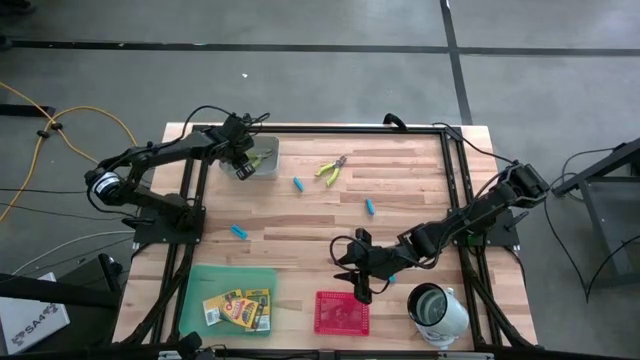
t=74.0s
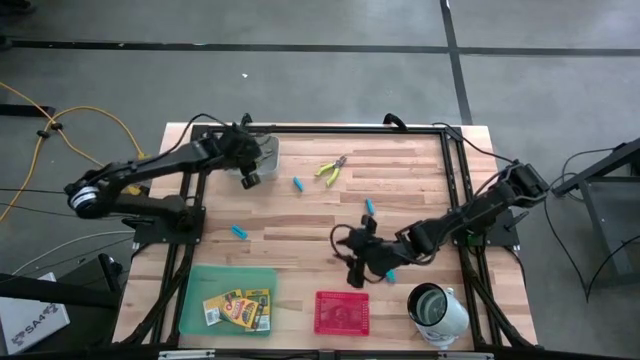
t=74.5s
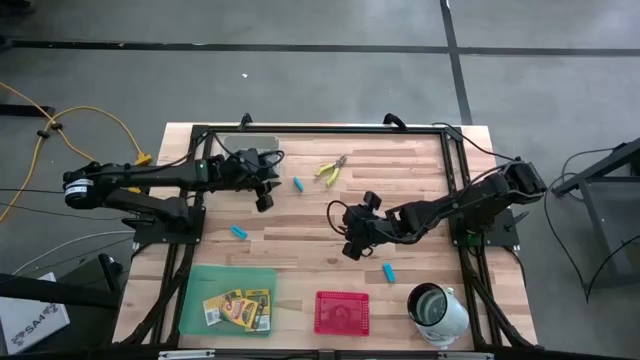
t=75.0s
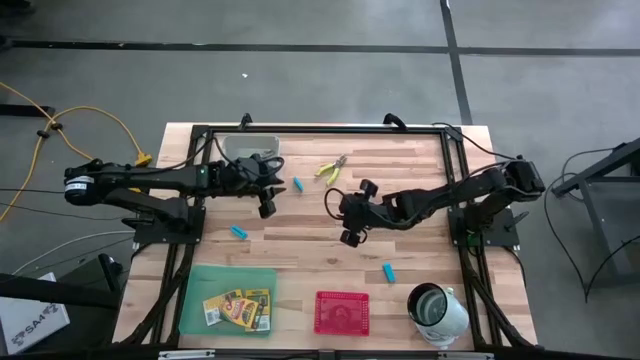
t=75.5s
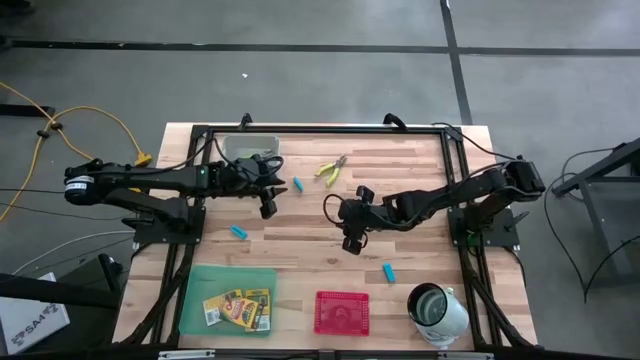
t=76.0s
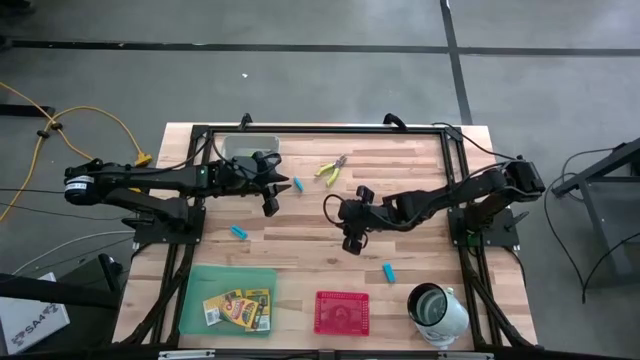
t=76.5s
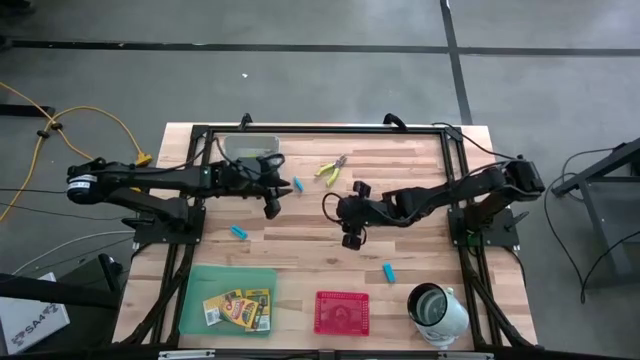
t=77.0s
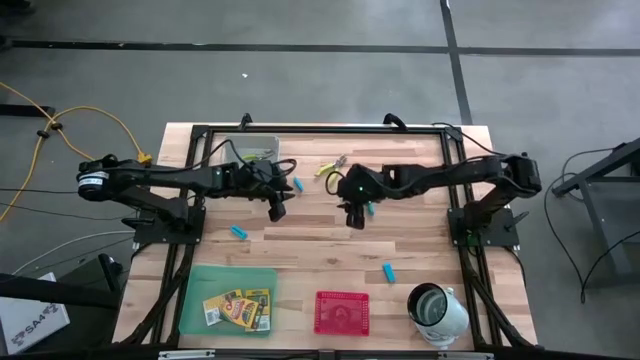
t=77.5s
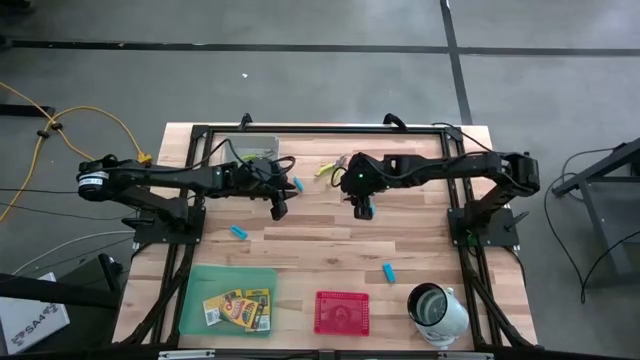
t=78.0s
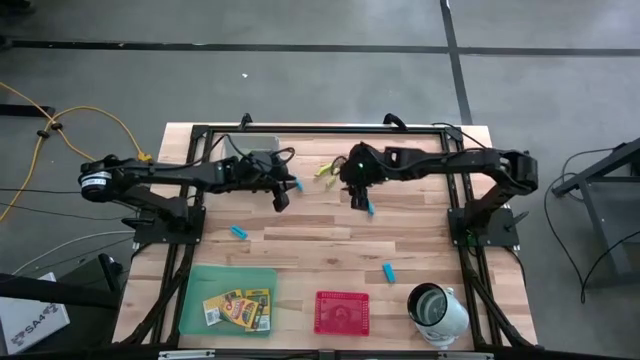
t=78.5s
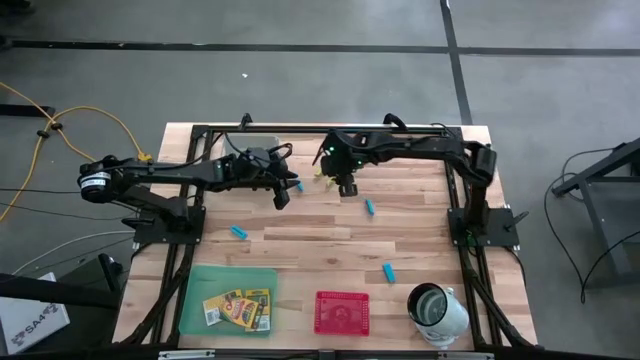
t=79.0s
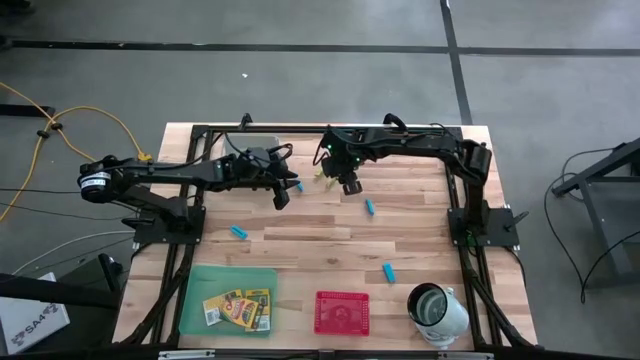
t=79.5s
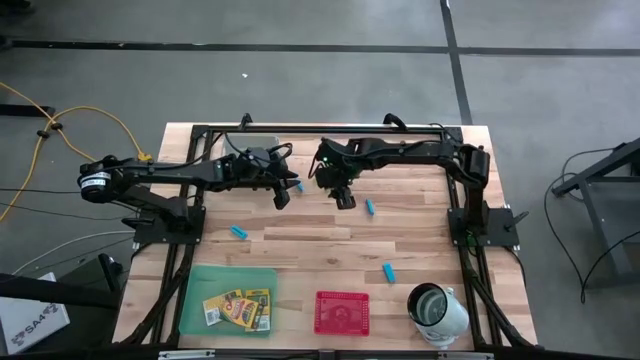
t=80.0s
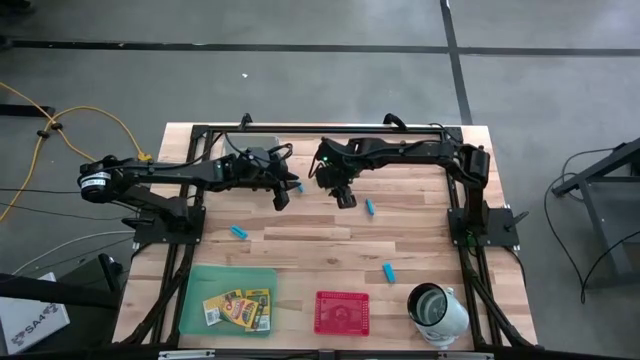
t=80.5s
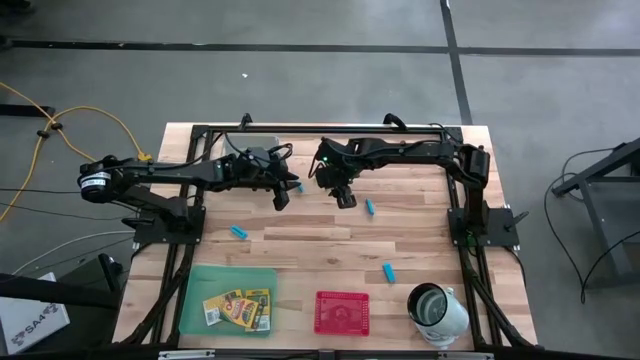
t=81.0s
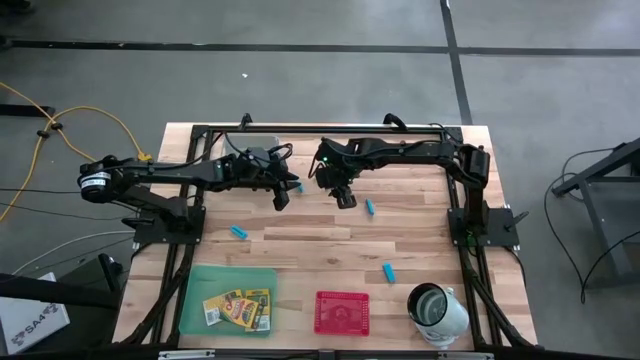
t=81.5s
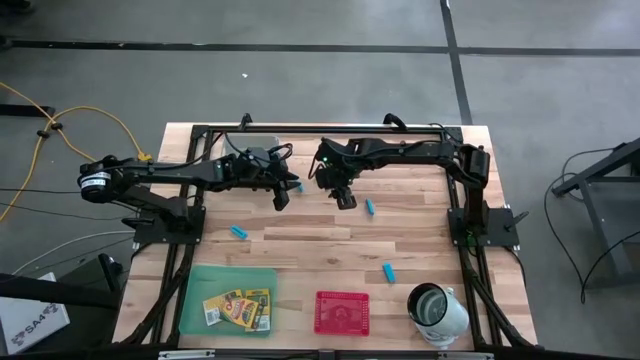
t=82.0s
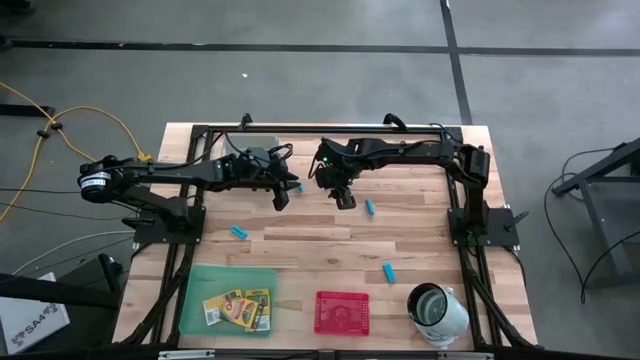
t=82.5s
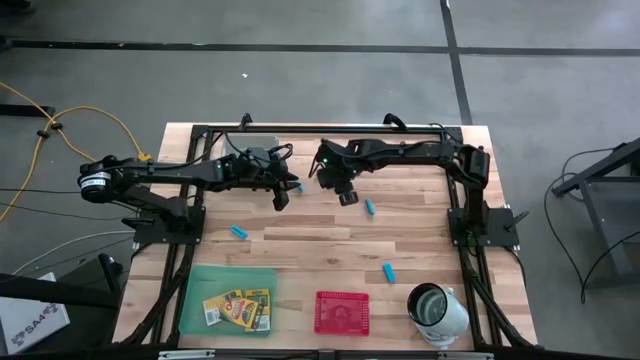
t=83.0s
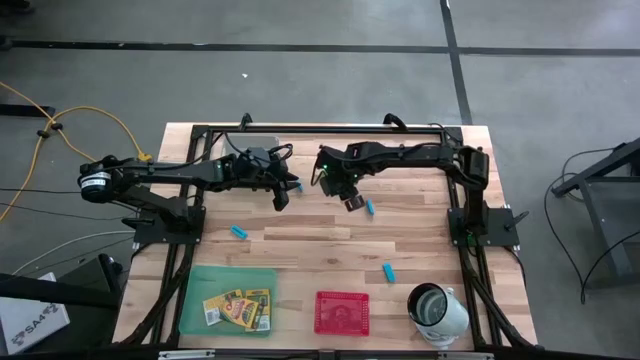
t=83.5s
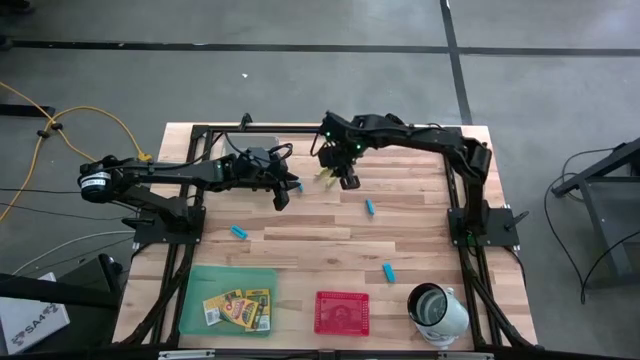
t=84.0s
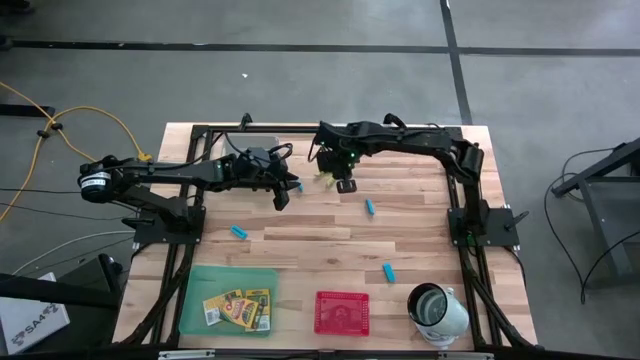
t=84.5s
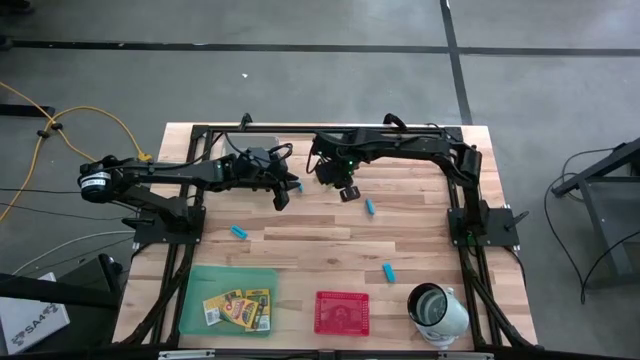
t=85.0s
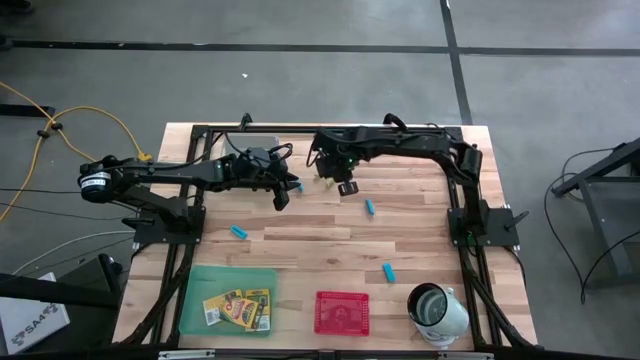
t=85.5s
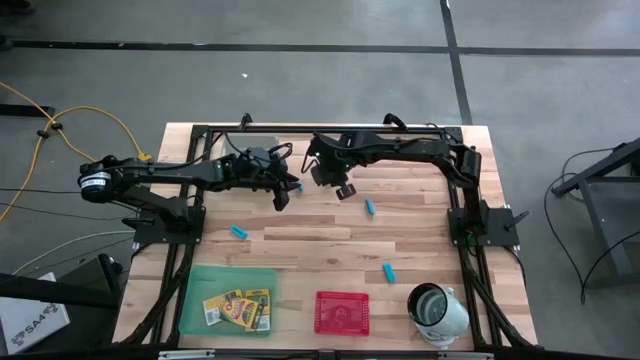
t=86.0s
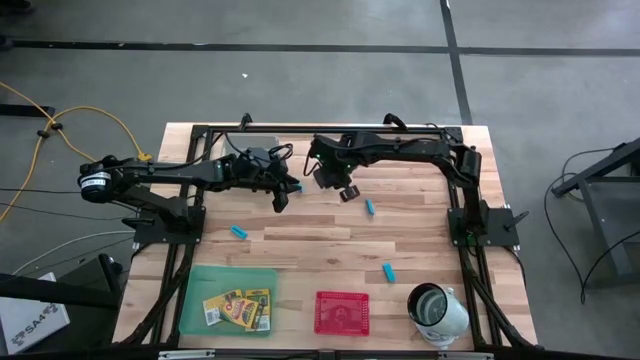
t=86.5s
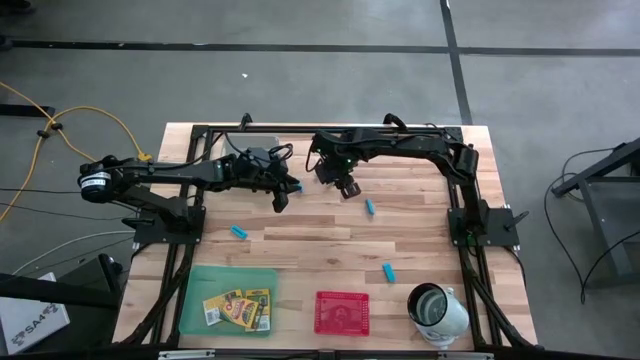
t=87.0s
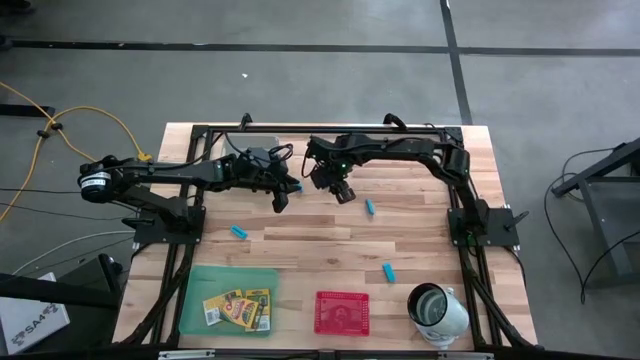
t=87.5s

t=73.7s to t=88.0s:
Task: Pick & Place School Supplies
Put the green hole puncher into the gray bin

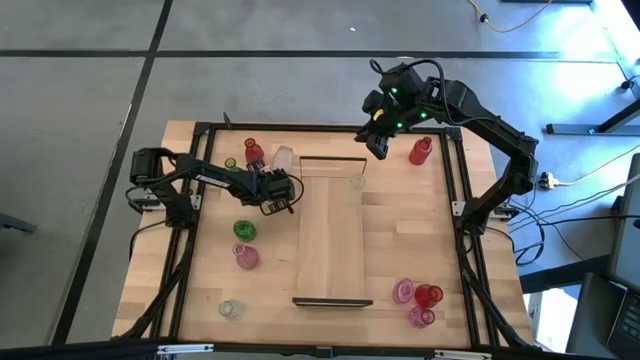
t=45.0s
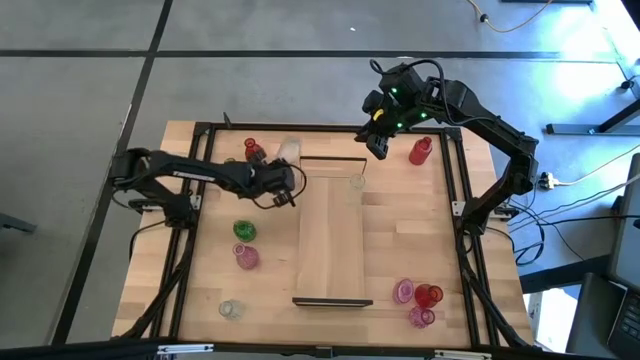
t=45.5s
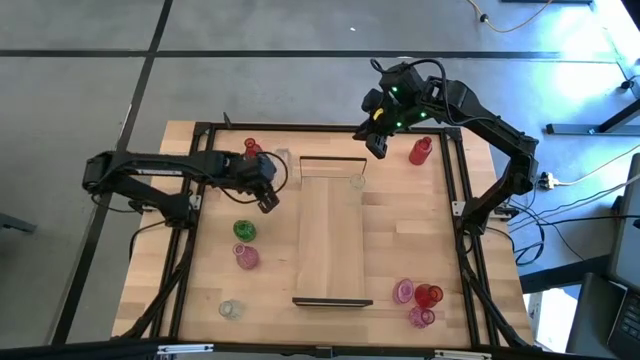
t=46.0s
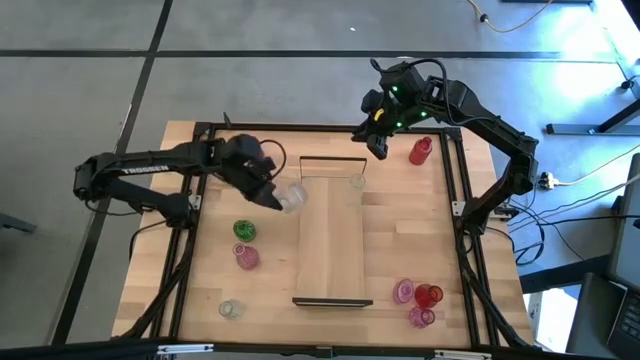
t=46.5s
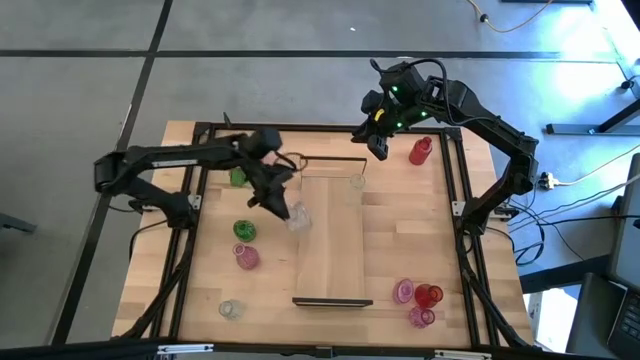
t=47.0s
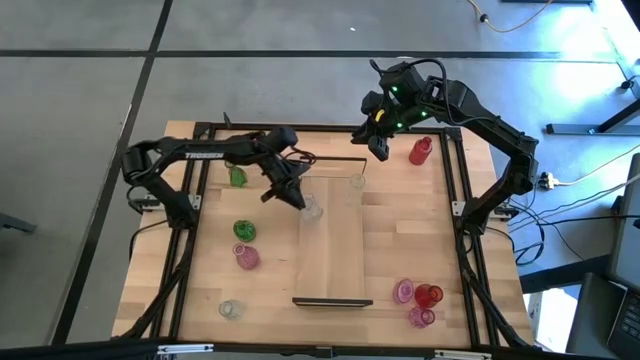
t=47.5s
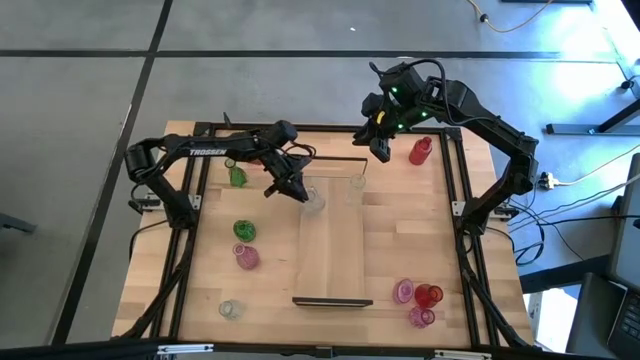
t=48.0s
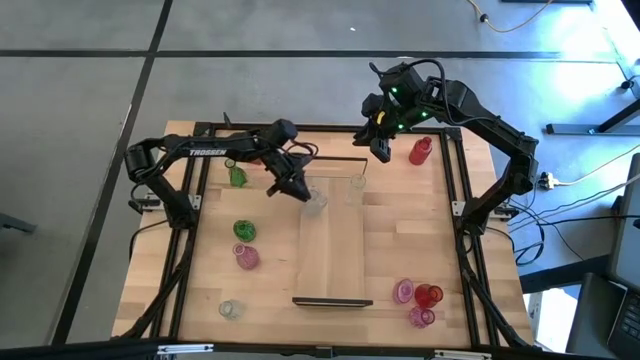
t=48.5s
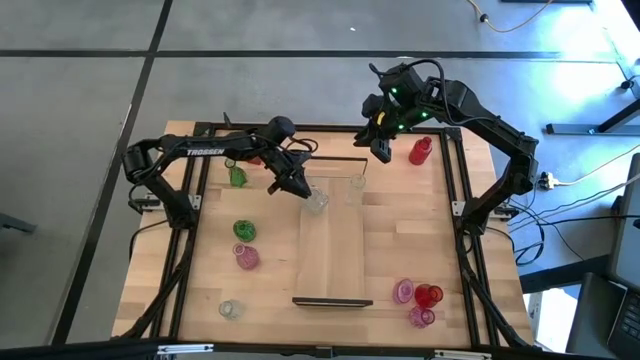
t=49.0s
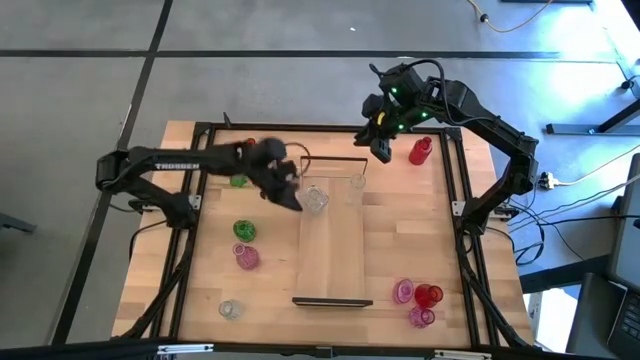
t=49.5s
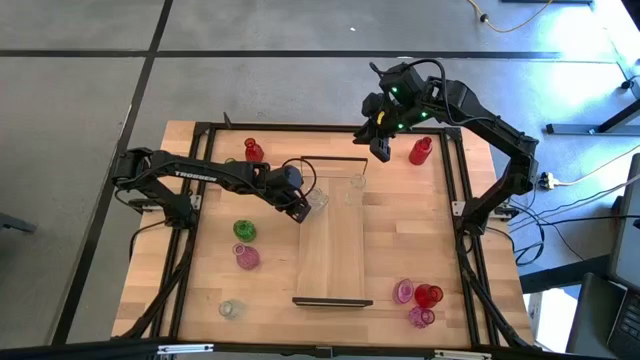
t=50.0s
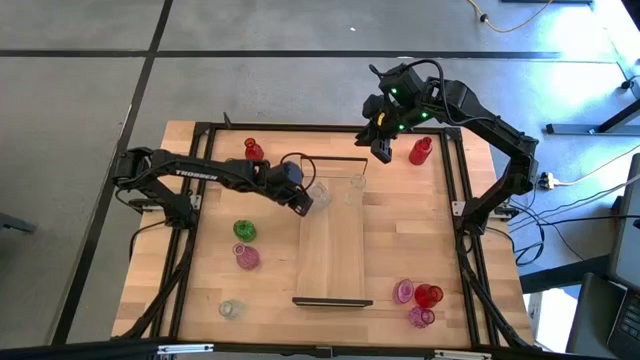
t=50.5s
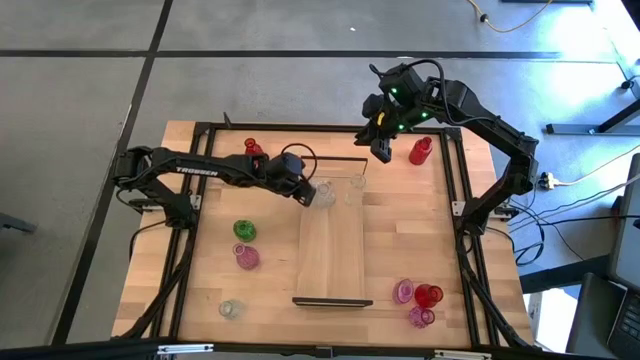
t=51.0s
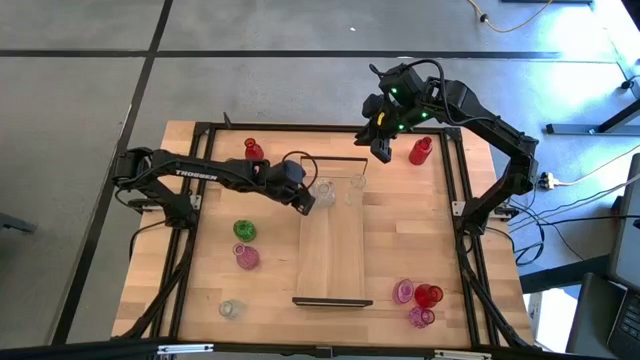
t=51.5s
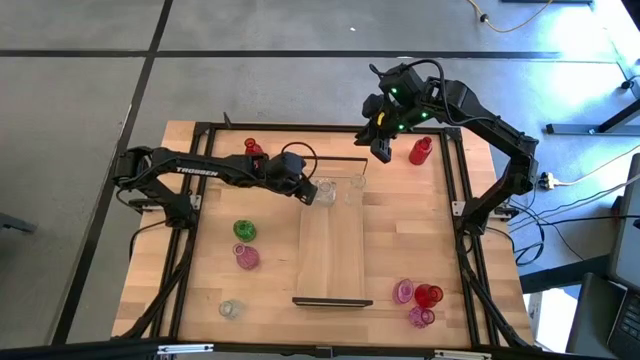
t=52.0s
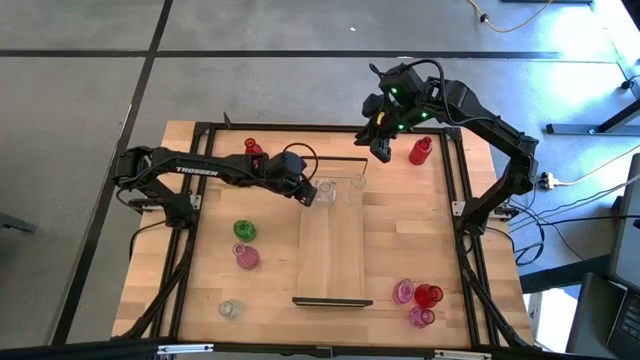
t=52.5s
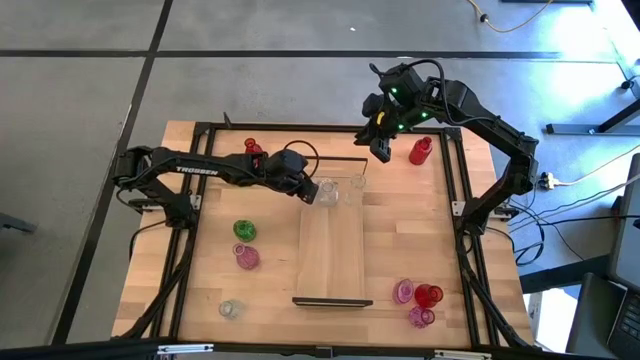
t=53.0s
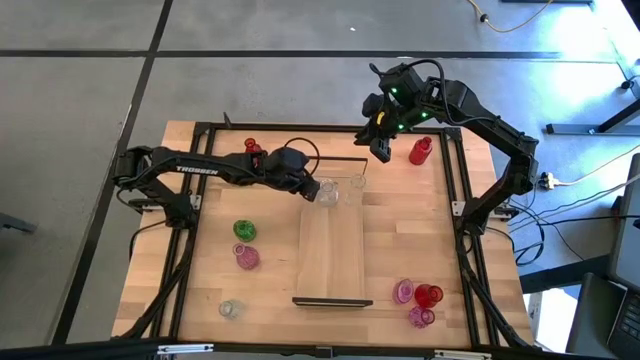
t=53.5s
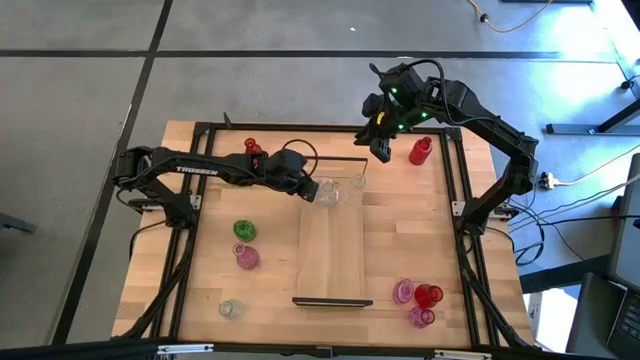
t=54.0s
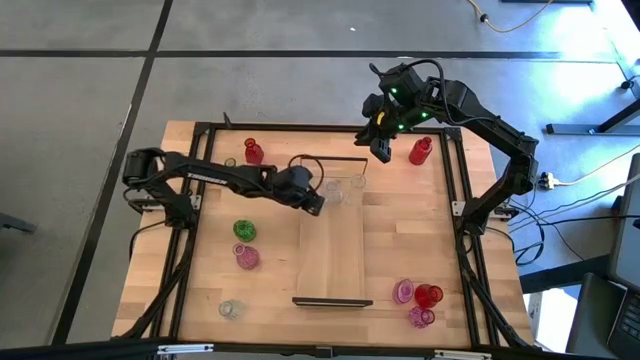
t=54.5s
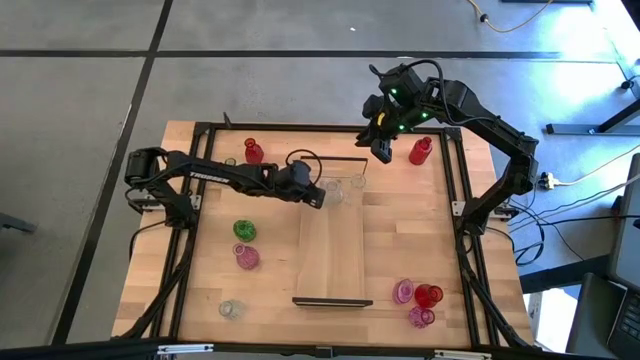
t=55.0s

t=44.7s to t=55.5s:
Task: sort vases onto shelf
Put the top transparent vase aligned with the other transparent vase on the shelf
